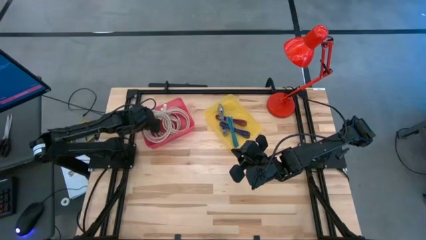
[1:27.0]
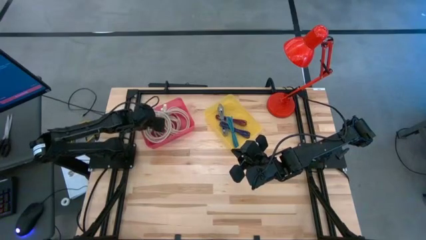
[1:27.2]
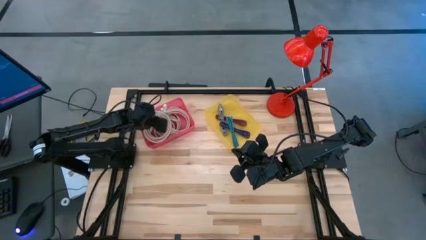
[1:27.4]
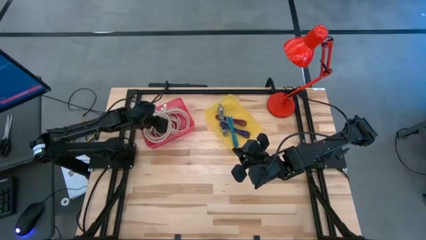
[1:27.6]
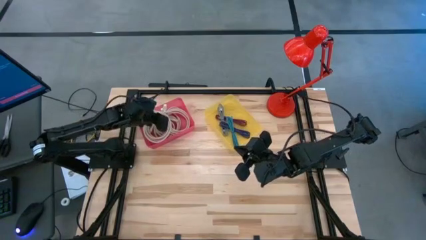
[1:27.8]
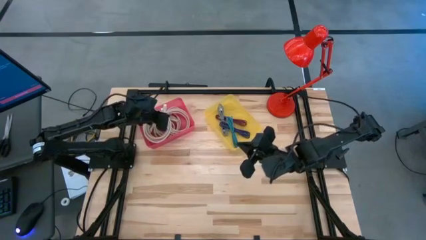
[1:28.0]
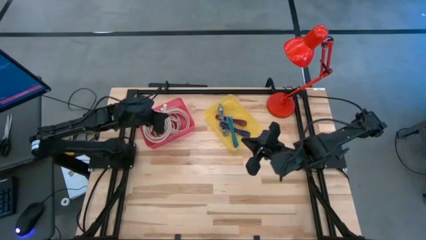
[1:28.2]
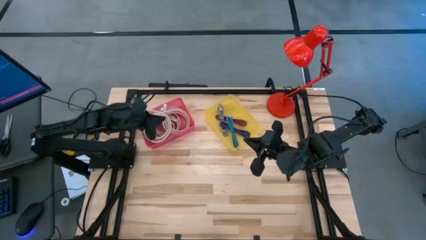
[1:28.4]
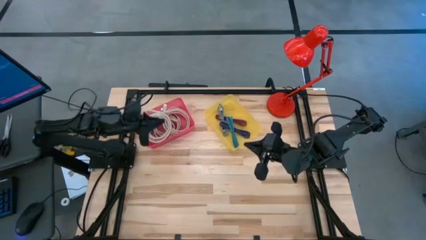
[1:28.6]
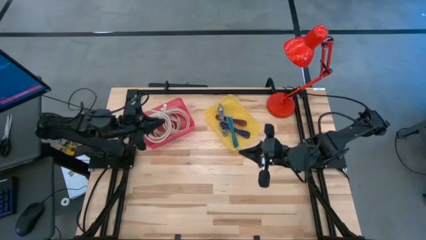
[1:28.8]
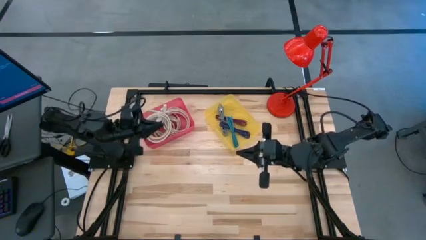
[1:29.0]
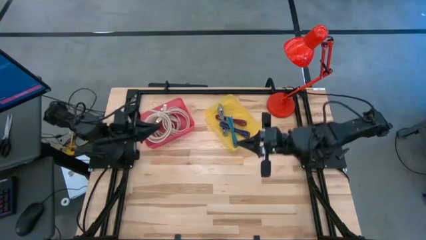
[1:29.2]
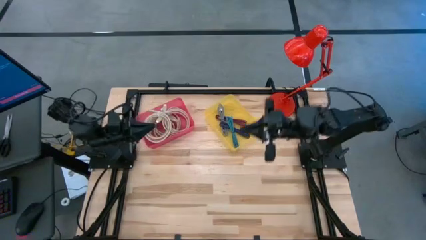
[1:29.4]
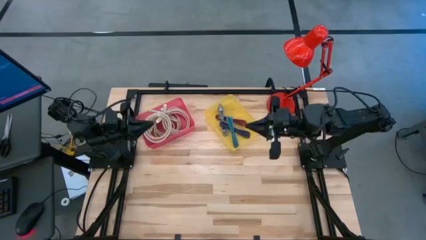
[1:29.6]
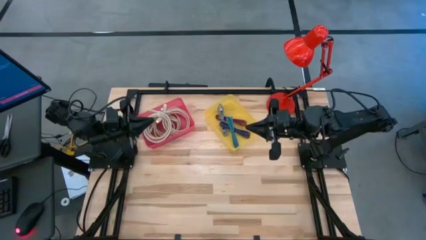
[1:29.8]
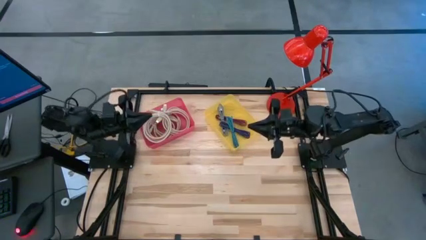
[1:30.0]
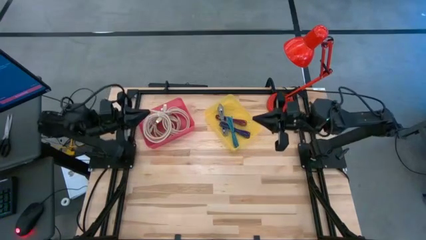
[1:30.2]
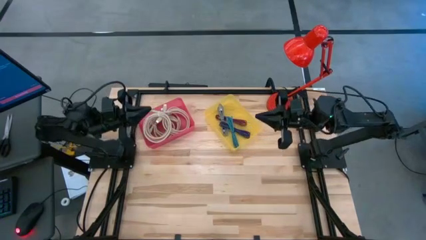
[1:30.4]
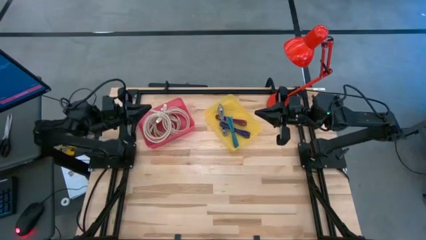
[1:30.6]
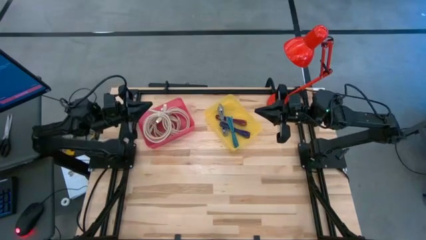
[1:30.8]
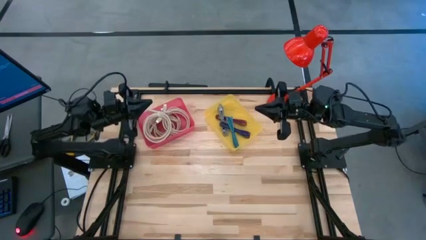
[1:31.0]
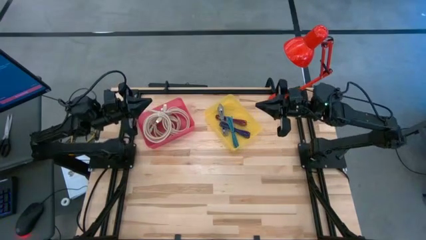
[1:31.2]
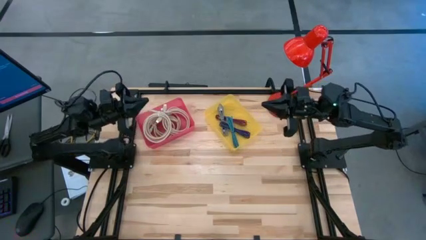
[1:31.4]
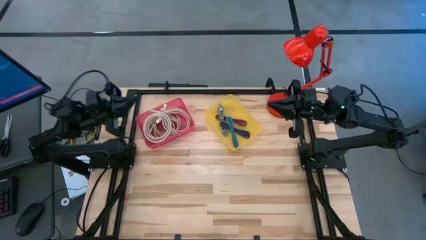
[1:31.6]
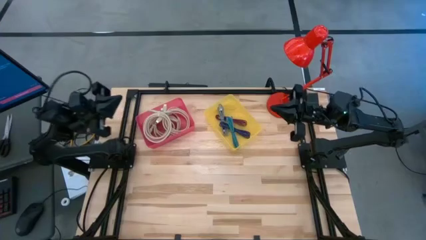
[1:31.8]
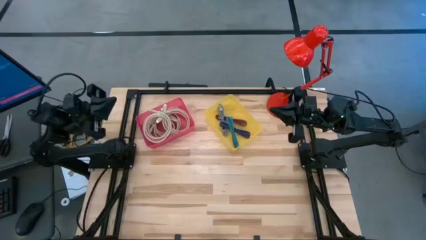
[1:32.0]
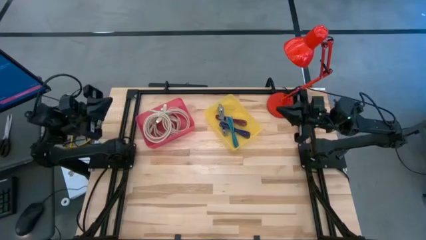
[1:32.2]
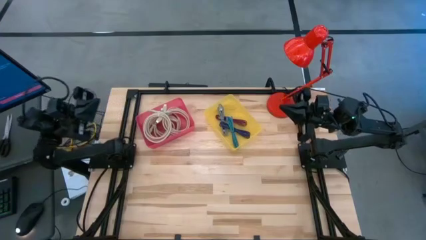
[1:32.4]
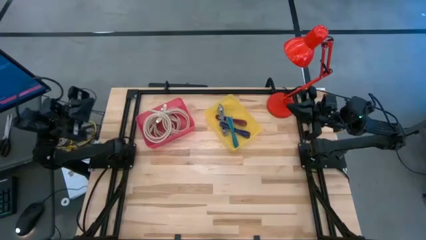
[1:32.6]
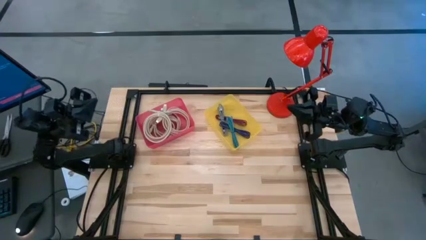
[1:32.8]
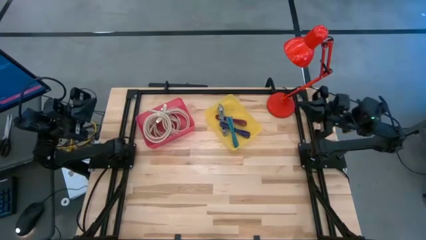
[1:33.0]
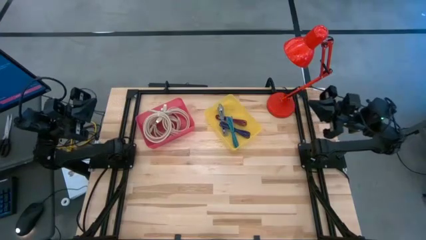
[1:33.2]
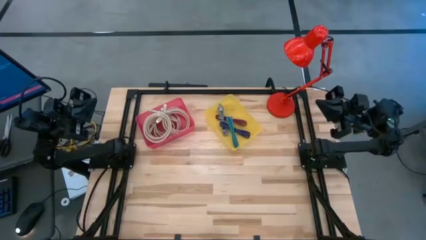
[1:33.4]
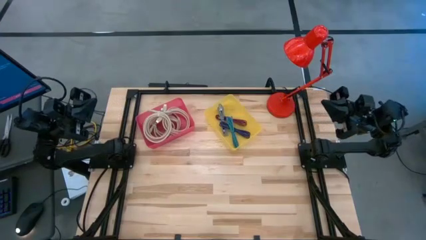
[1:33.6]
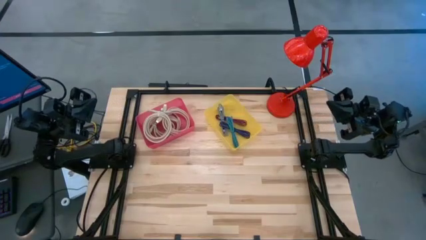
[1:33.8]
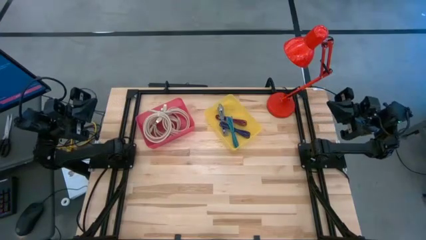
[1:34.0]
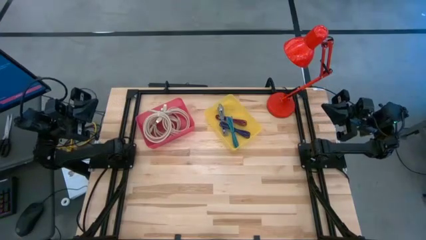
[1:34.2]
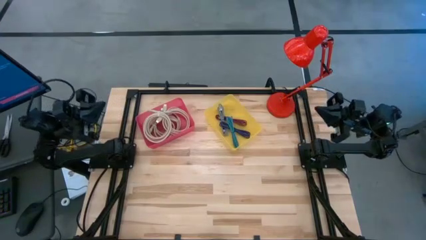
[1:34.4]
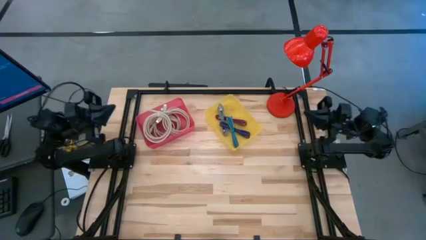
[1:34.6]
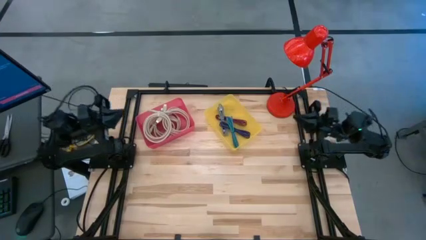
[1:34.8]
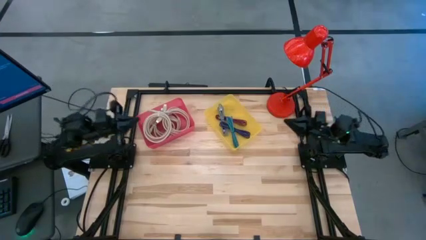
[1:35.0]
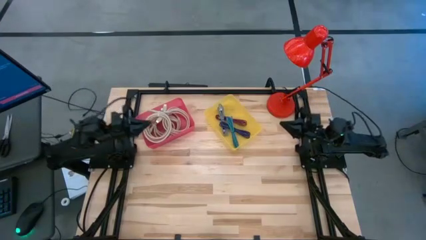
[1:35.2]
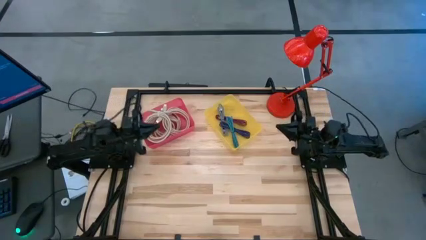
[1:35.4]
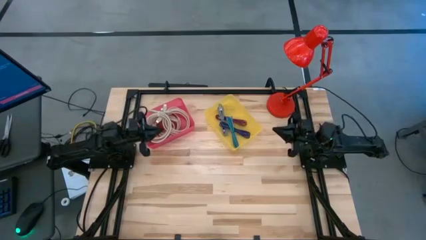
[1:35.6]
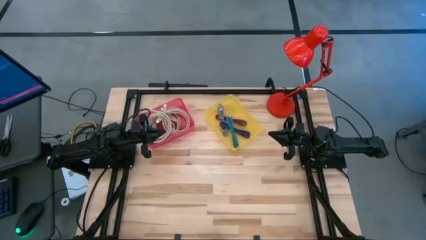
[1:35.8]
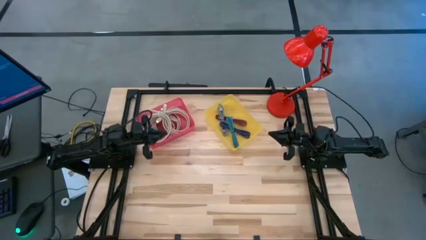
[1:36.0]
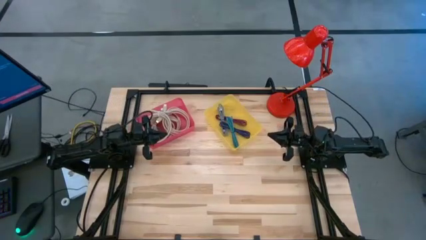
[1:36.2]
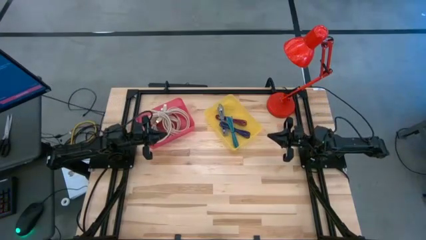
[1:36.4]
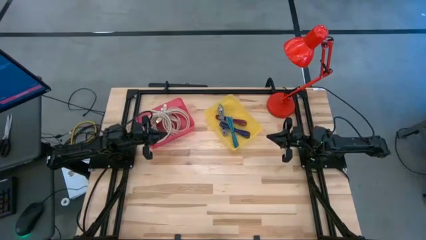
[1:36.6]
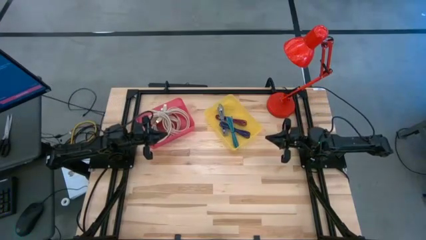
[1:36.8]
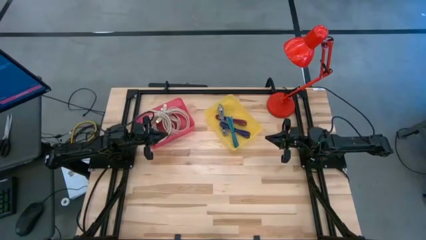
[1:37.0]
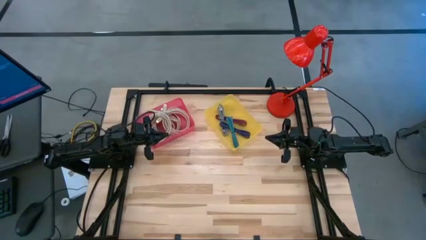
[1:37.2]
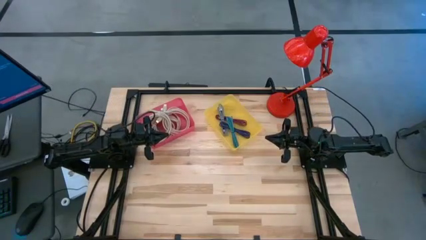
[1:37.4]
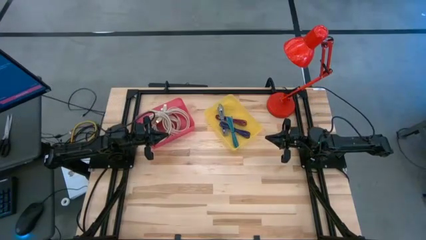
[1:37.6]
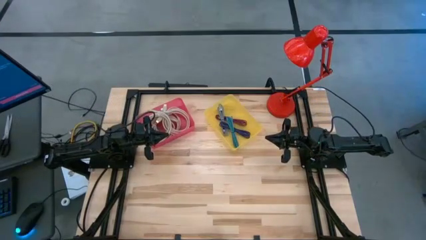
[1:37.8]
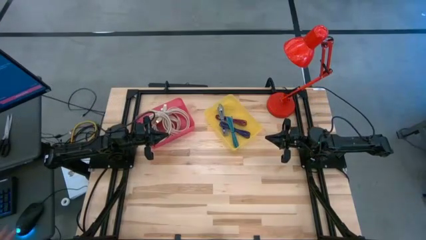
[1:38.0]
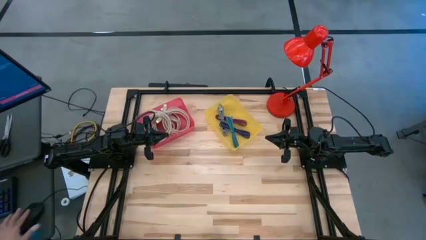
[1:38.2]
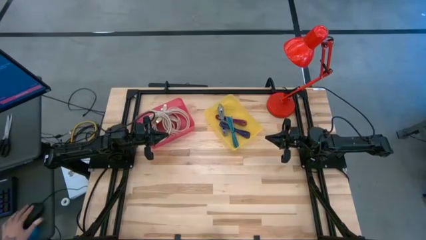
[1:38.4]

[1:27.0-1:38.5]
Task: Pick & Place USB Port
Return to Home Position

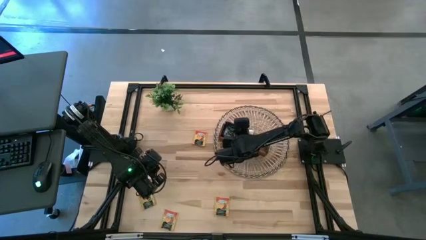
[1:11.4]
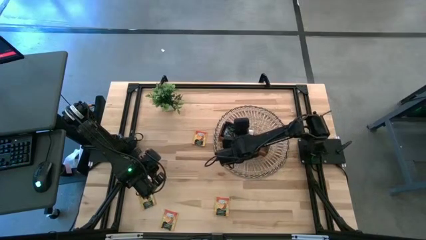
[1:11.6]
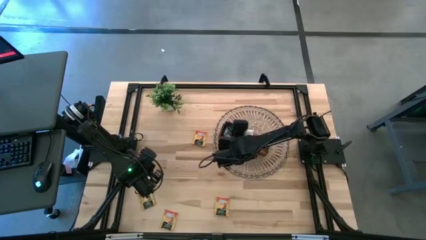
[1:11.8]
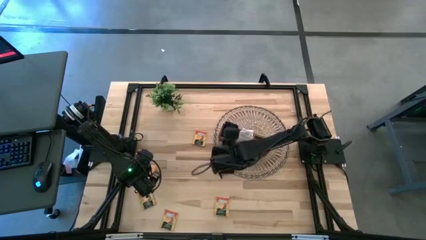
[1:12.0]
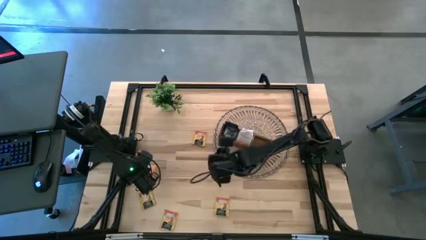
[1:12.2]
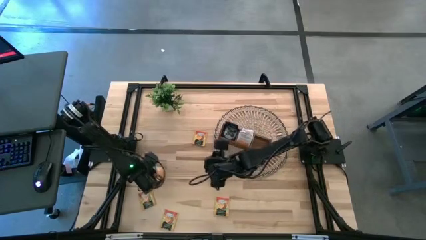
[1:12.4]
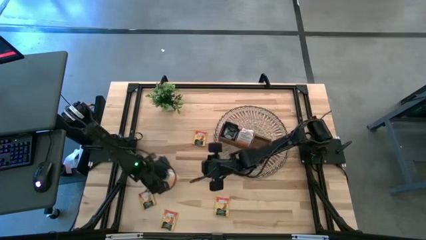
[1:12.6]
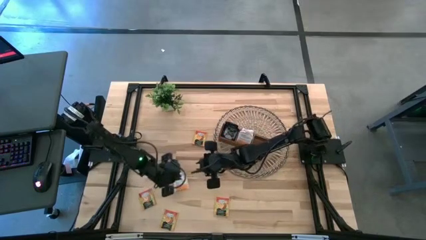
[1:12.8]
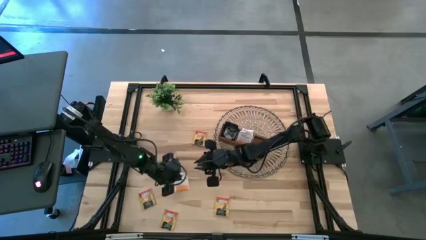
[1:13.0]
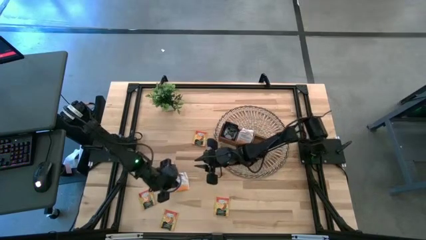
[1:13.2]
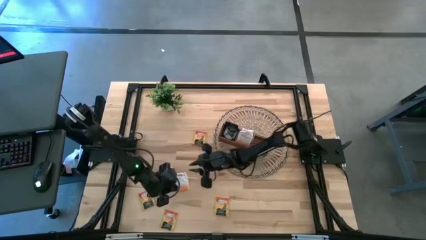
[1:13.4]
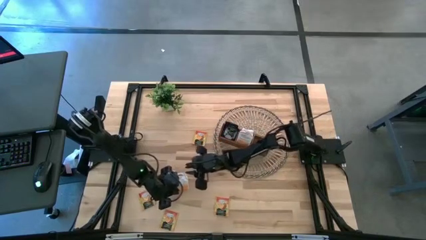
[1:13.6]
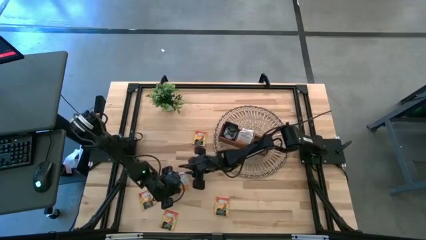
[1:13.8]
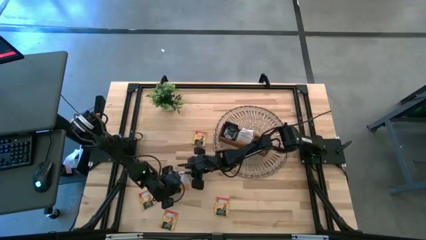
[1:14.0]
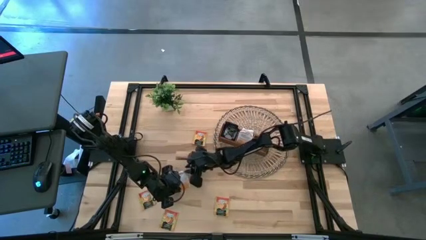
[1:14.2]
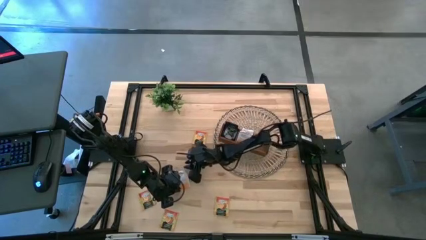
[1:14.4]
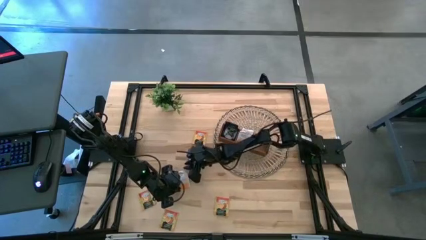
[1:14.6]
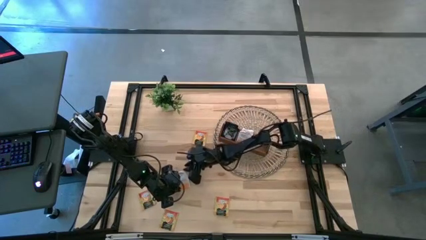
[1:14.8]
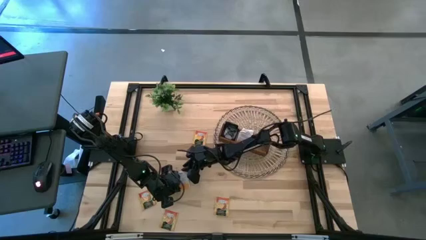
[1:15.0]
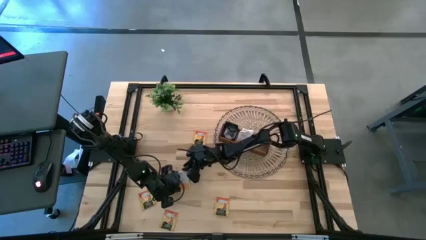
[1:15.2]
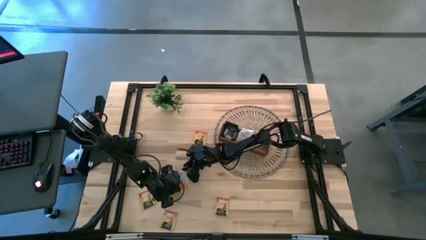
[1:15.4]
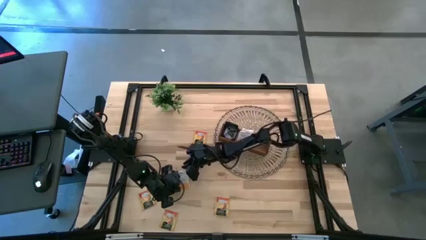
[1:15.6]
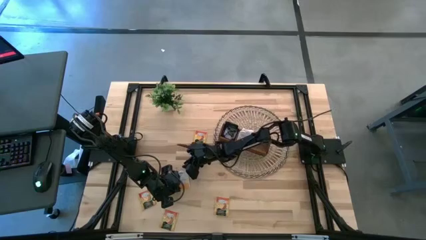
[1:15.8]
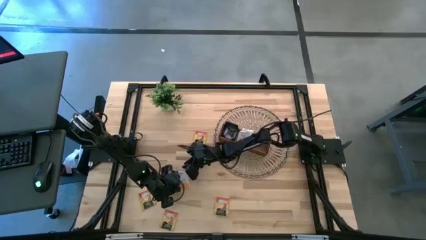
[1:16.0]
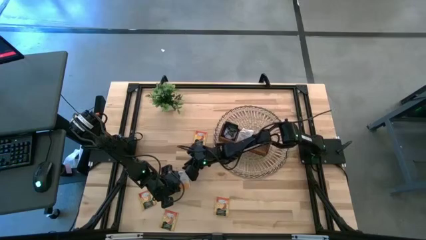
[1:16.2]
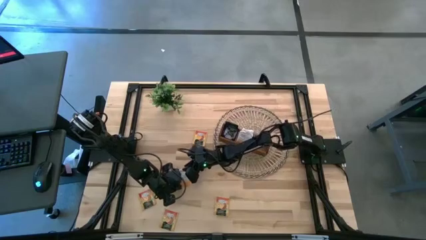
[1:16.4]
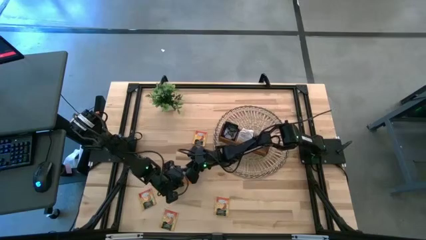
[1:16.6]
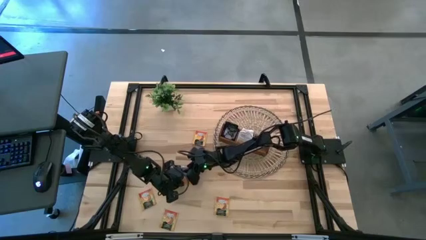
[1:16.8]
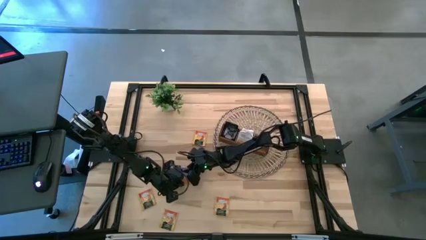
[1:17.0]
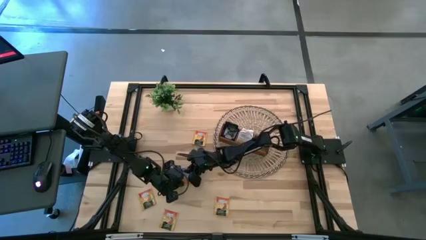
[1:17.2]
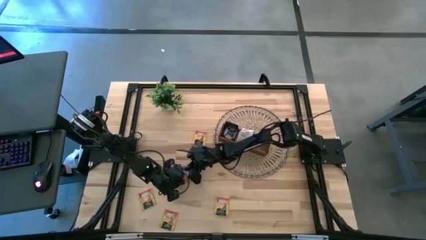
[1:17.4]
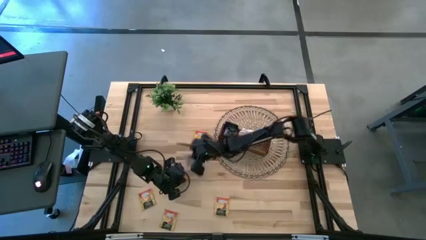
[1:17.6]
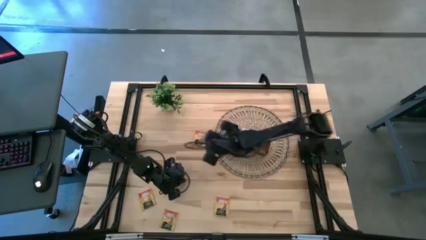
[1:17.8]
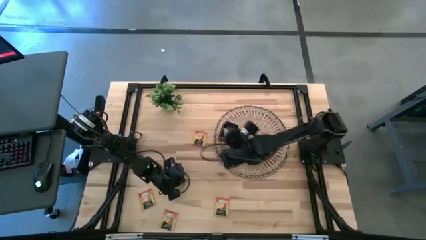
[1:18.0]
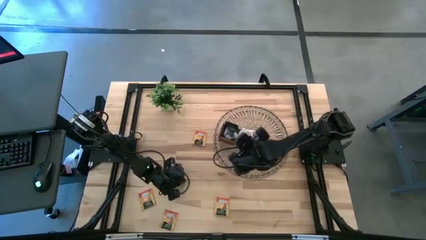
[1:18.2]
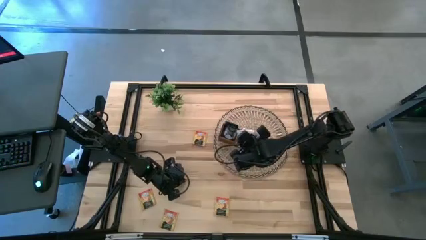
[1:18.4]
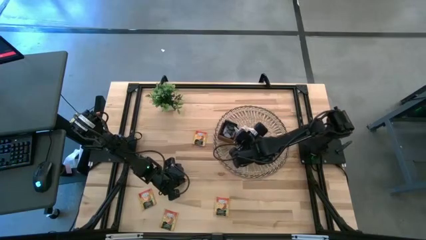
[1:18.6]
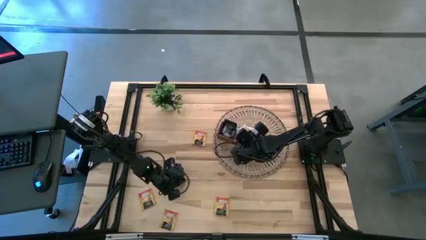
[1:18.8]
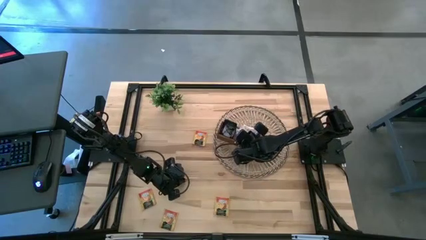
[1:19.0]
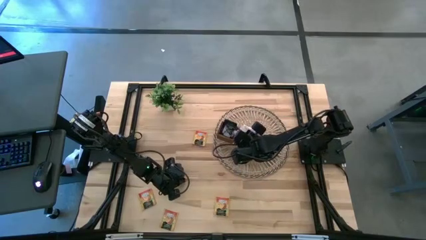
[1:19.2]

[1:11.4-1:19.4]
Task: Pick & Place Tea
Put the white tea bag into the middle section of the wooden organizer
